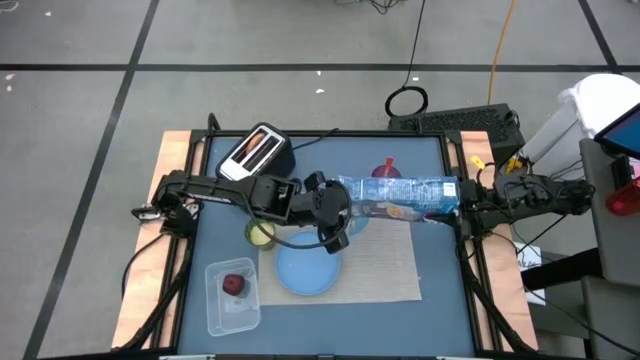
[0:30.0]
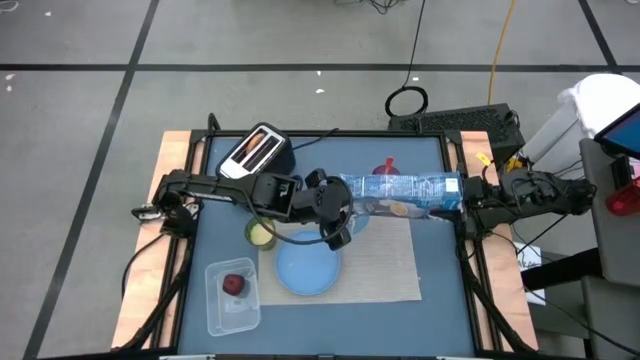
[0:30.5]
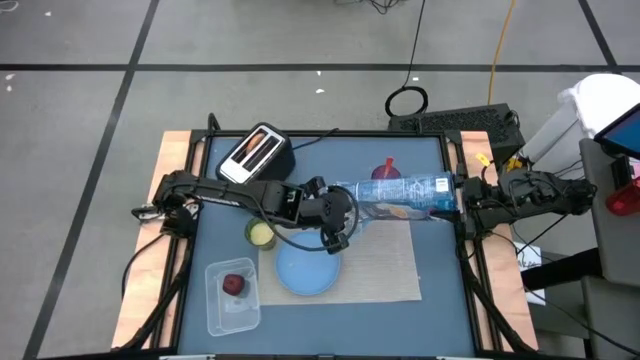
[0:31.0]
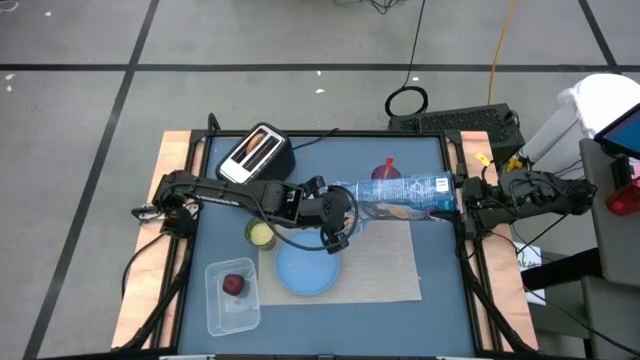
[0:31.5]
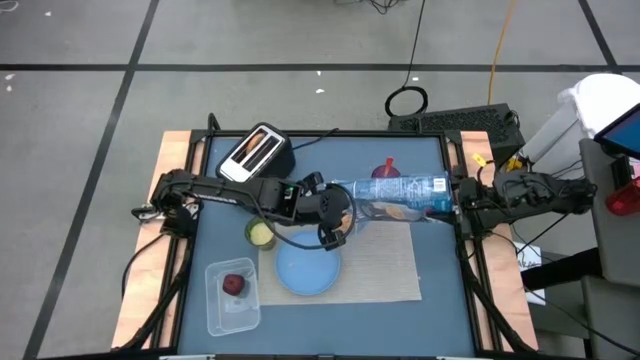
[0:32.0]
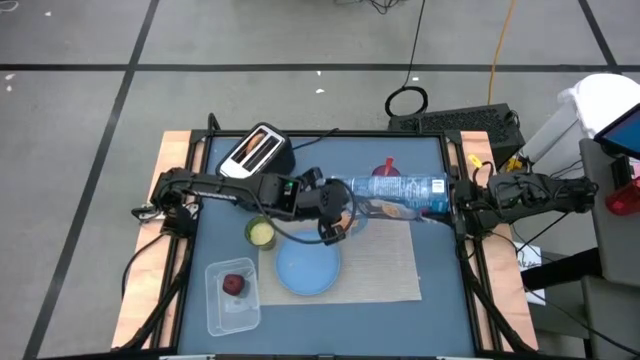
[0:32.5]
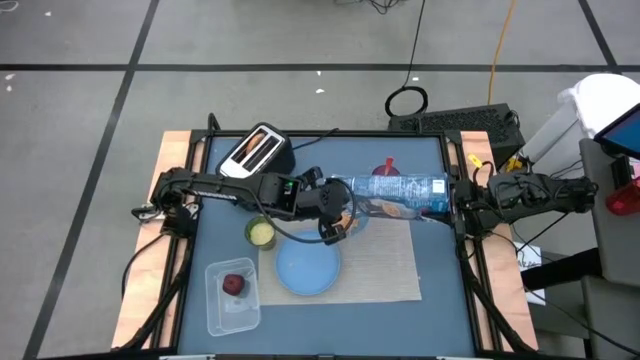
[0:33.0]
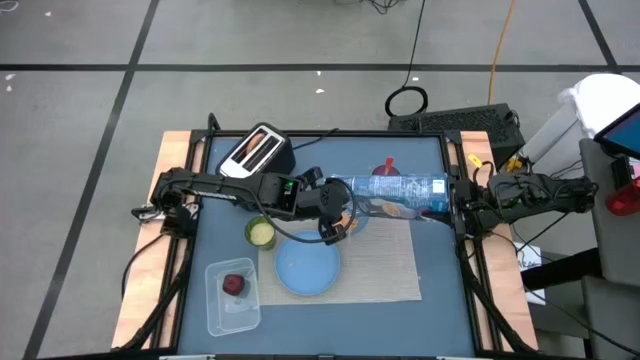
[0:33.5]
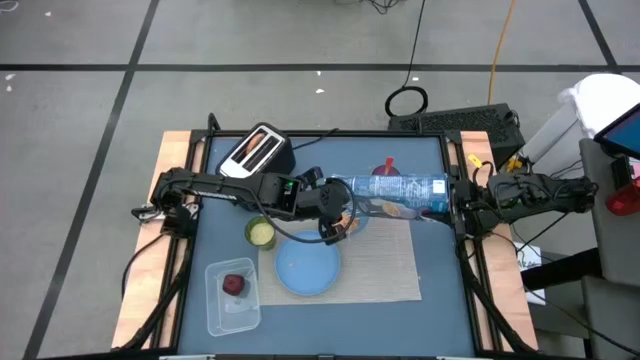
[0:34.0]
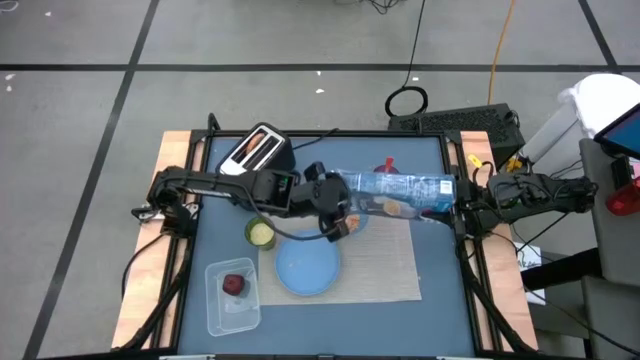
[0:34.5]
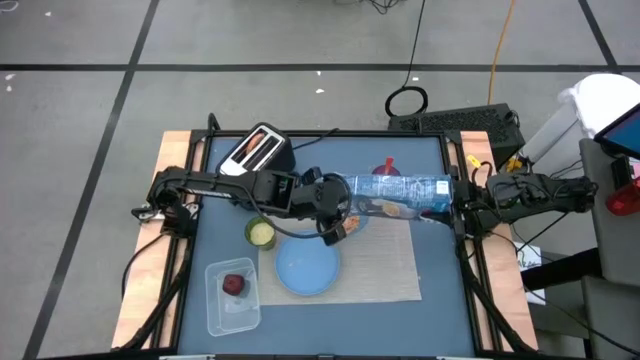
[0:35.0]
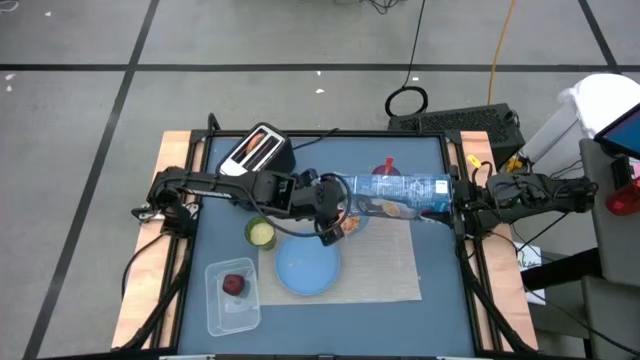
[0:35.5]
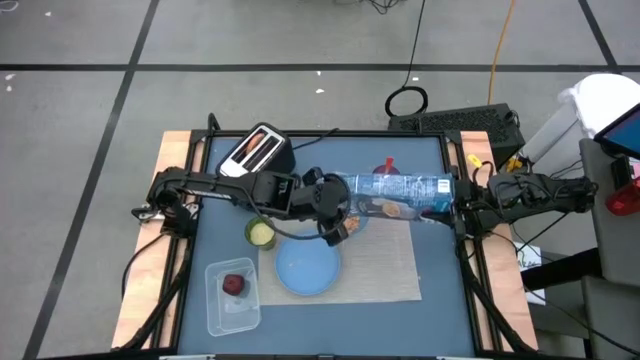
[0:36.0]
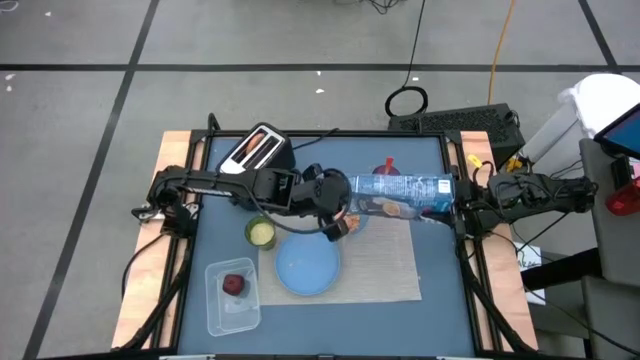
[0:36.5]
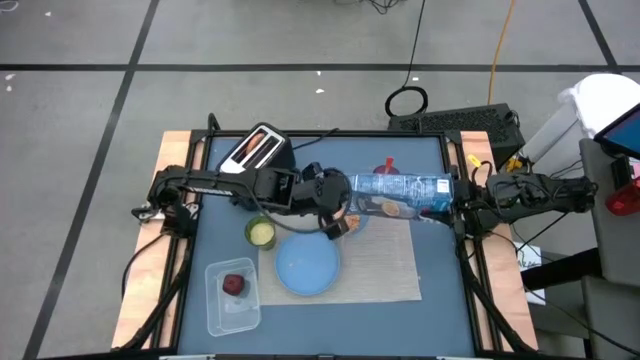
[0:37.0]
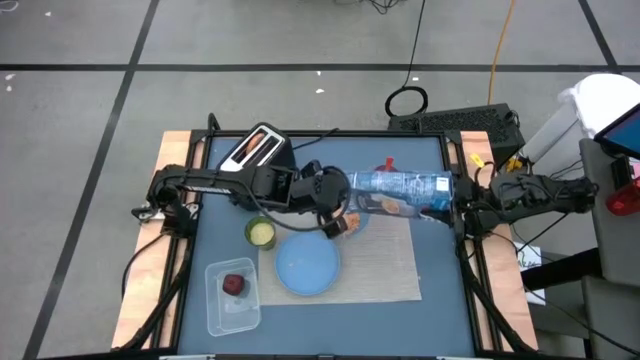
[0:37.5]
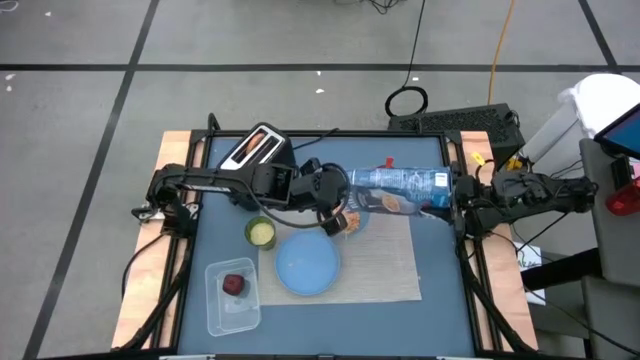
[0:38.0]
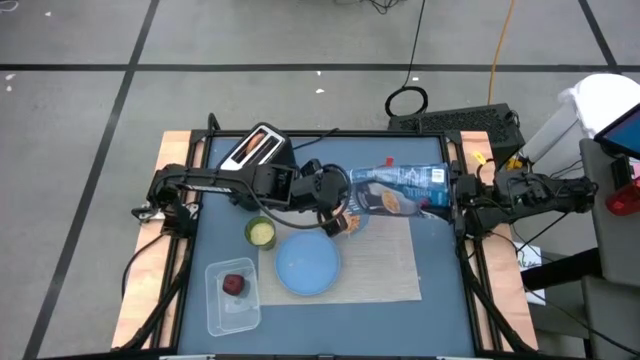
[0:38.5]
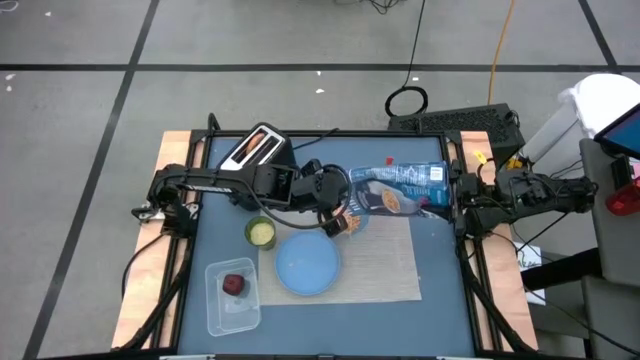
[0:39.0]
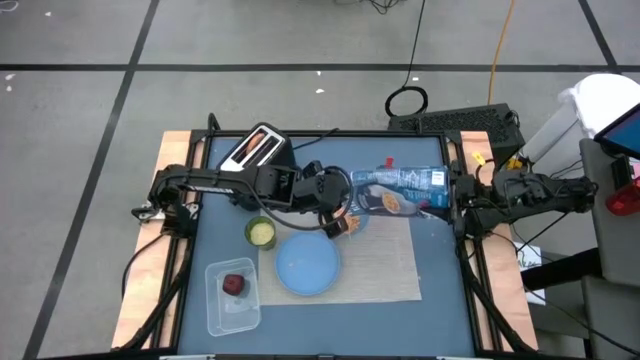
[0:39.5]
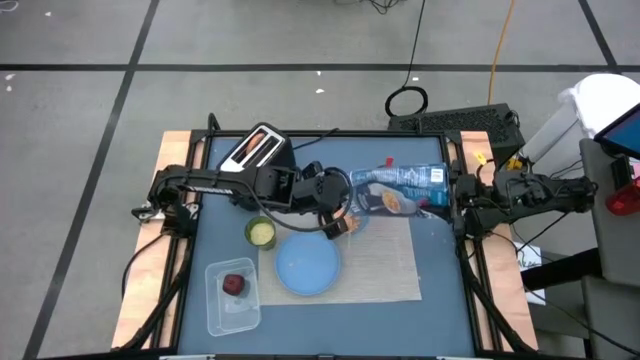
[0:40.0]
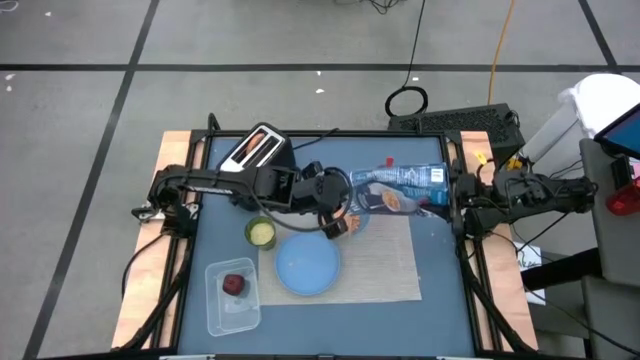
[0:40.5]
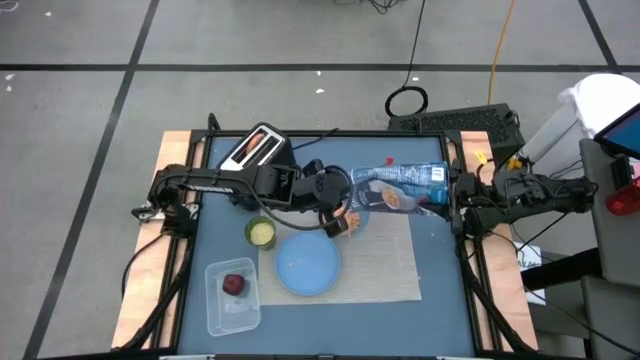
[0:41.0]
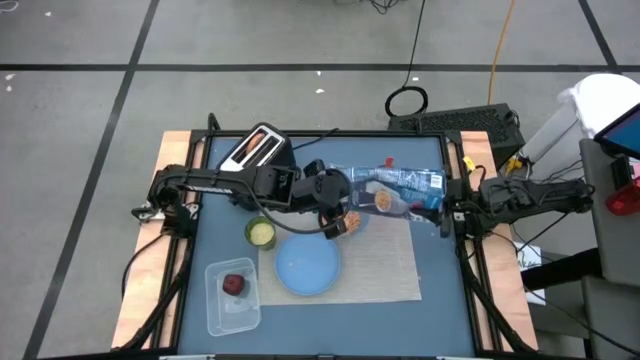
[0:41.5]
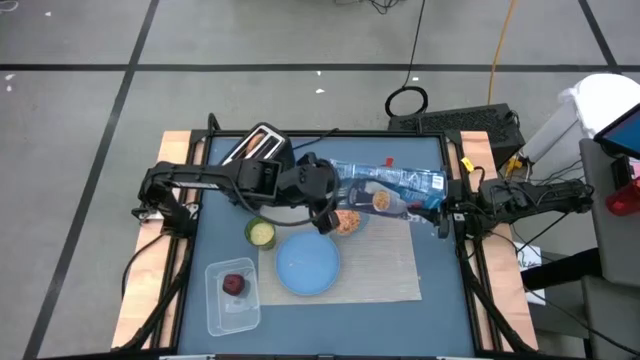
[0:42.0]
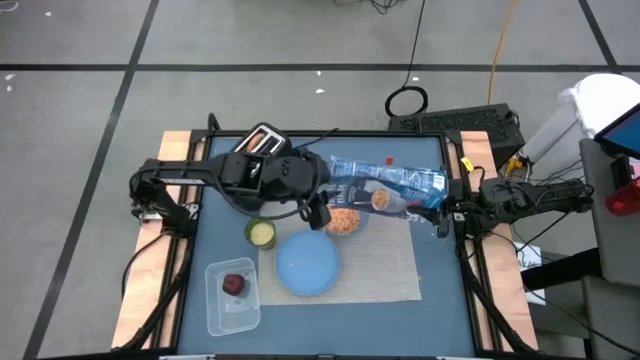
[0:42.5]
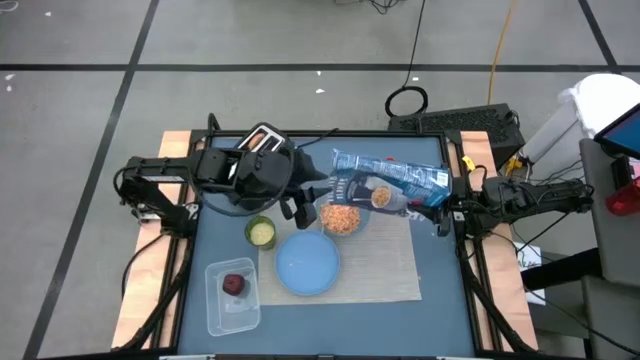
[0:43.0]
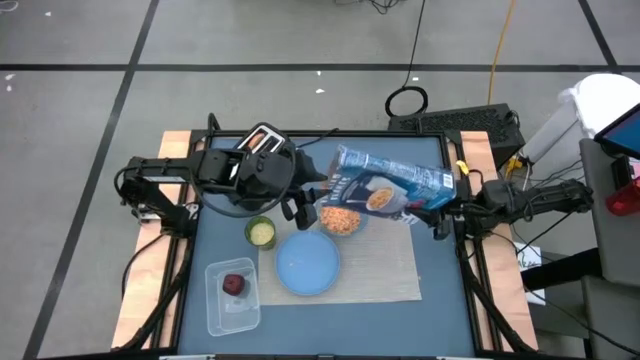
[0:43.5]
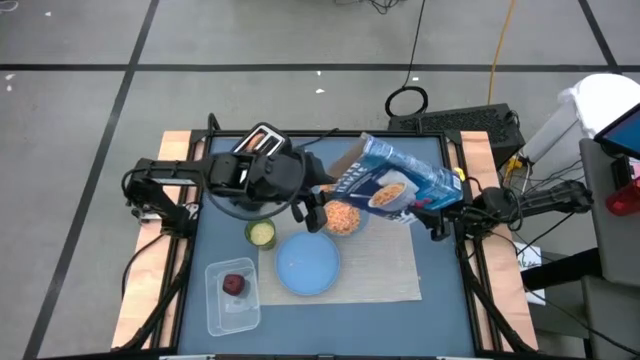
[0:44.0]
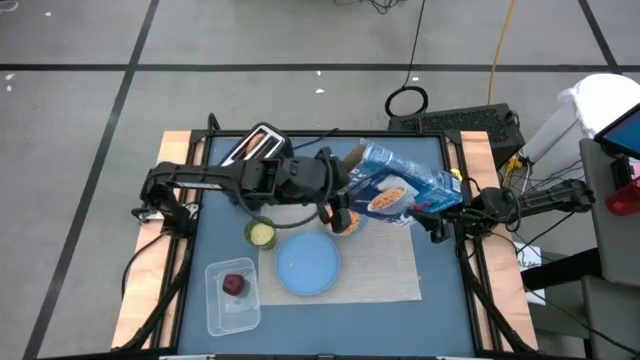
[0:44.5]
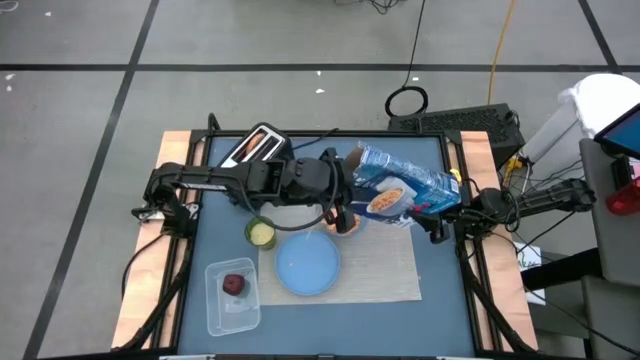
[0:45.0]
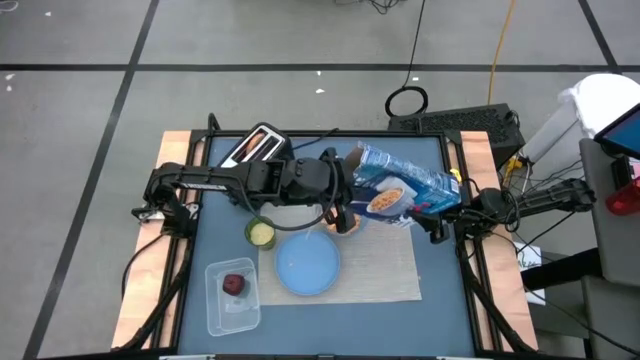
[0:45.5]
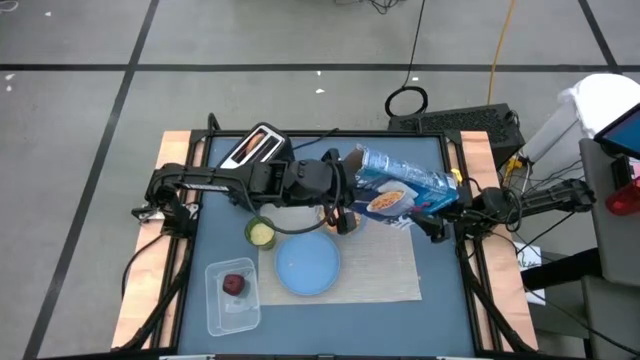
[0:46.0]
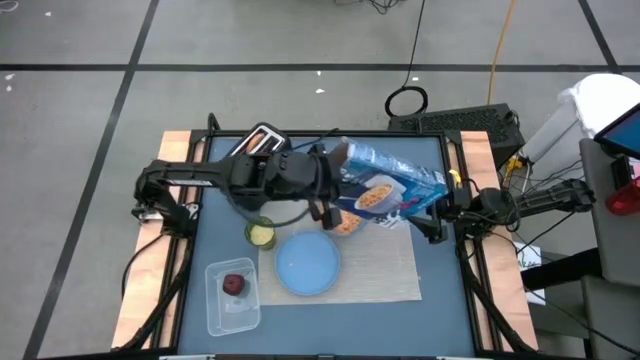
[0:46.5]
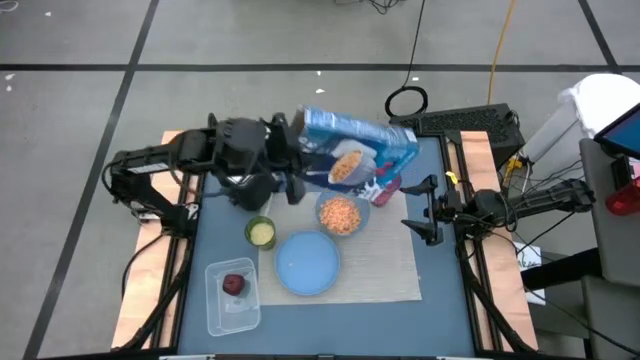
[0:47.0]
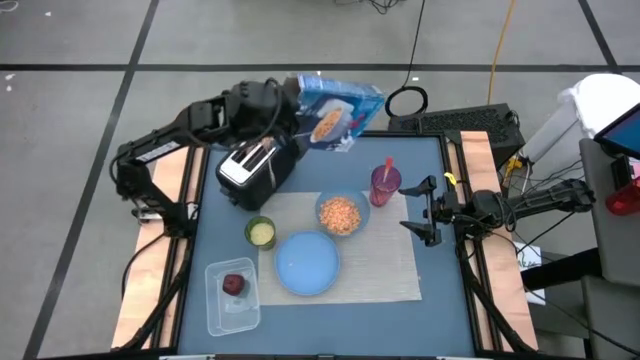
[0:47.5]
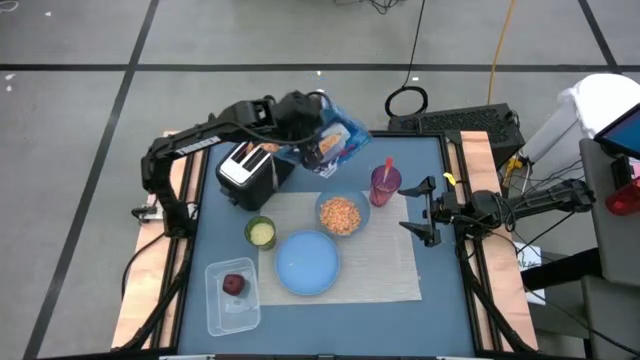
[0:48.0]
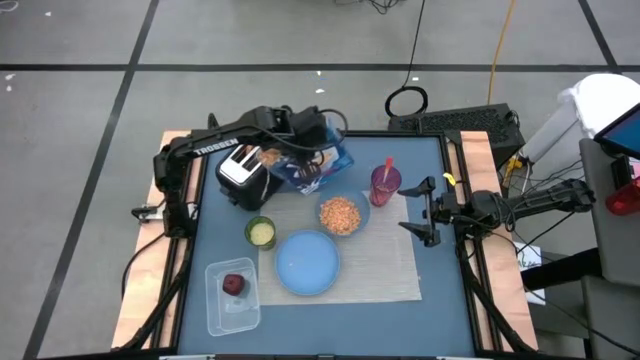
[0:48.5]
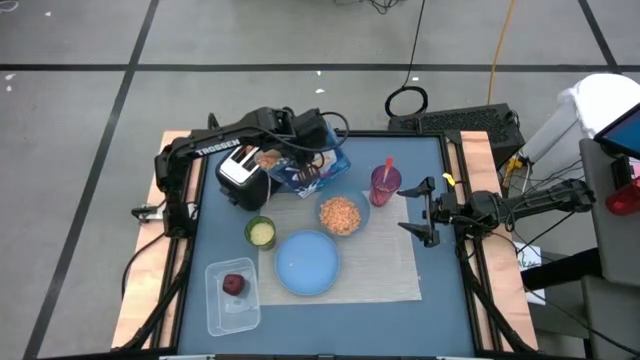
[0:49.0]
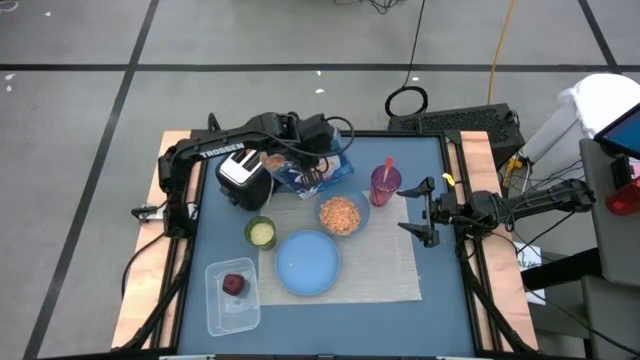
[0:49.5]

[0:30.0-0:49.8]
Task: Arrange a breakfast setting
Pour the cereal into the light blue bowl
